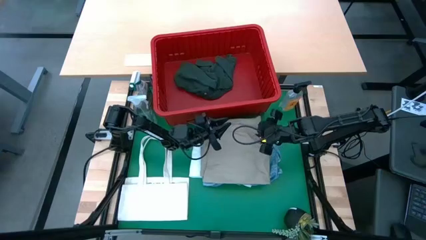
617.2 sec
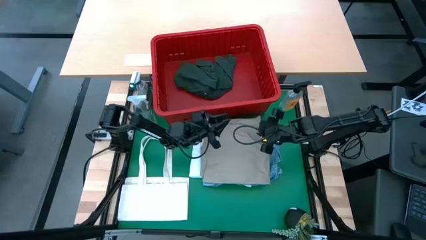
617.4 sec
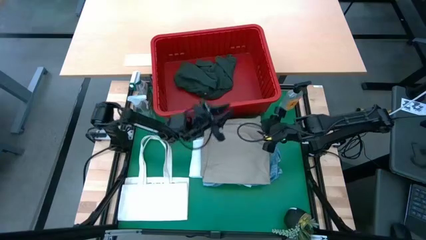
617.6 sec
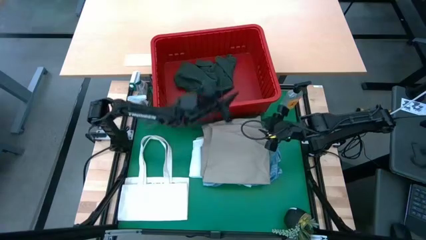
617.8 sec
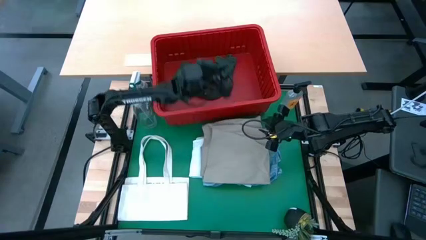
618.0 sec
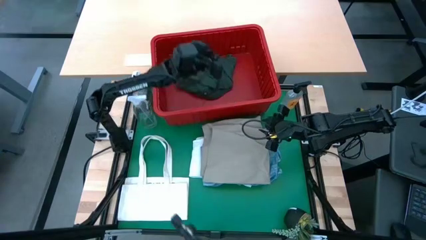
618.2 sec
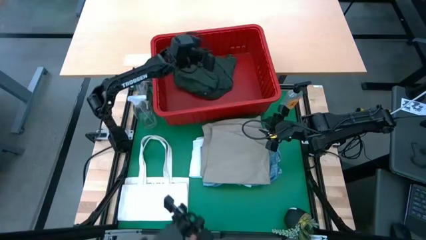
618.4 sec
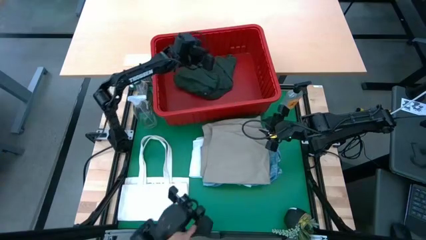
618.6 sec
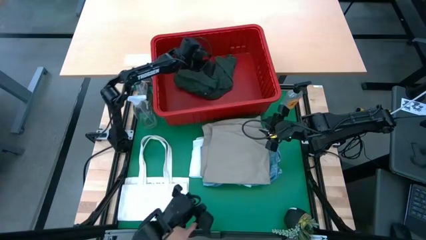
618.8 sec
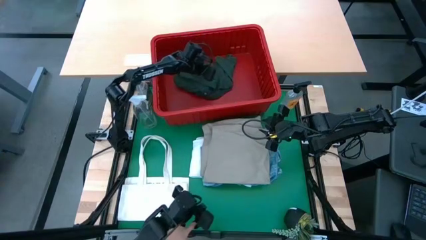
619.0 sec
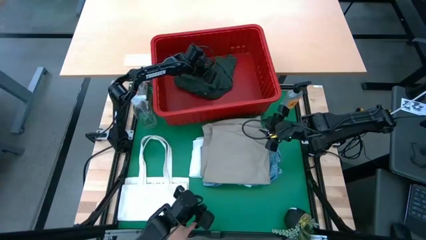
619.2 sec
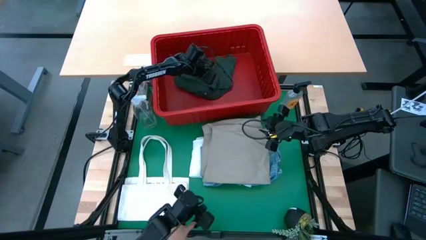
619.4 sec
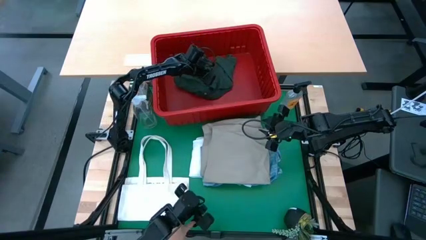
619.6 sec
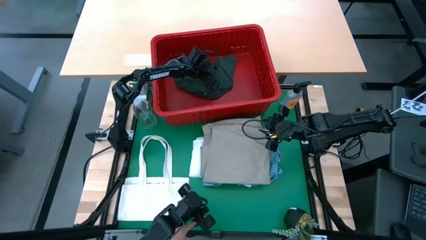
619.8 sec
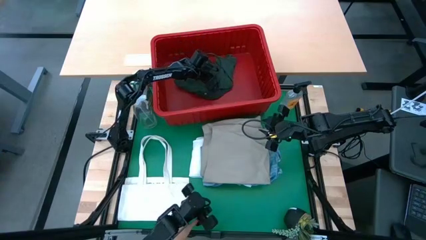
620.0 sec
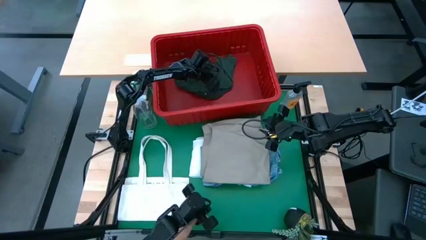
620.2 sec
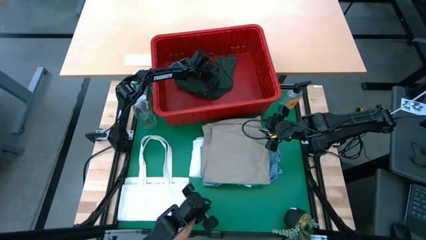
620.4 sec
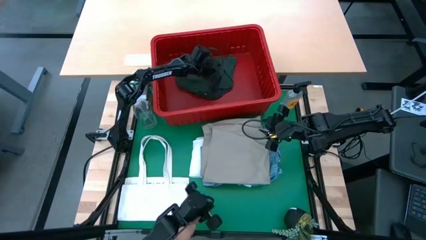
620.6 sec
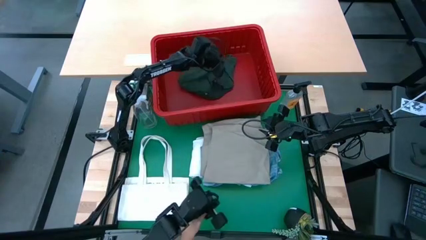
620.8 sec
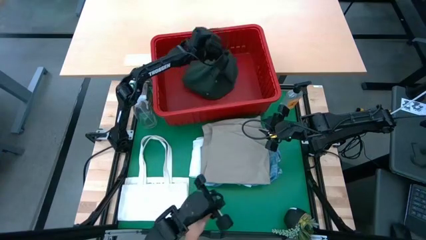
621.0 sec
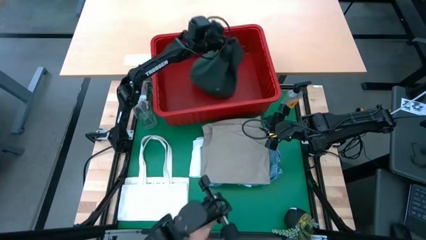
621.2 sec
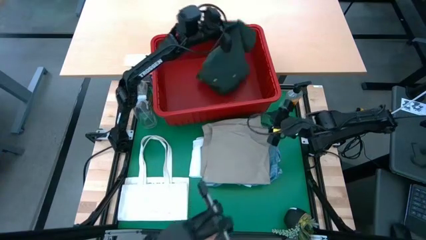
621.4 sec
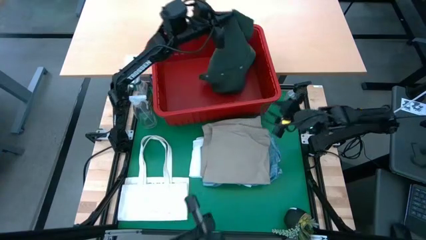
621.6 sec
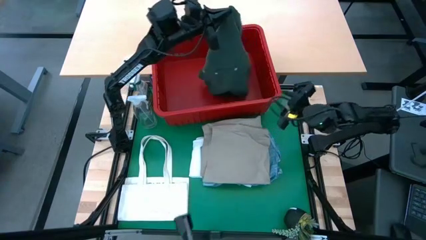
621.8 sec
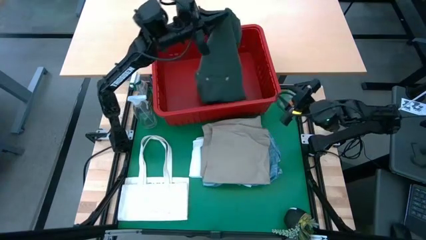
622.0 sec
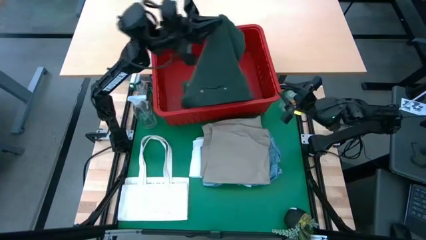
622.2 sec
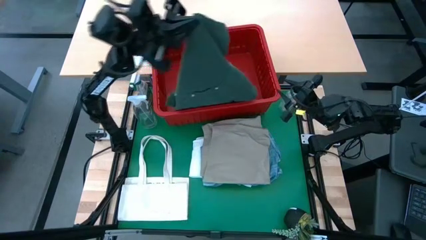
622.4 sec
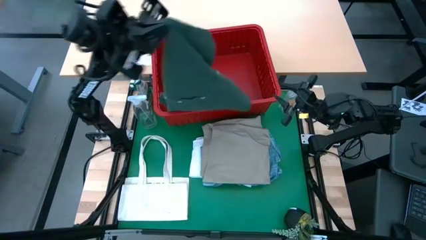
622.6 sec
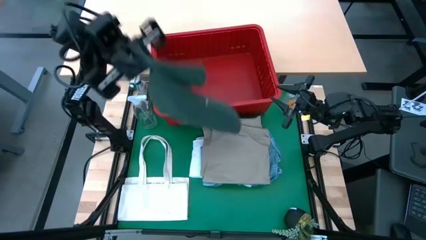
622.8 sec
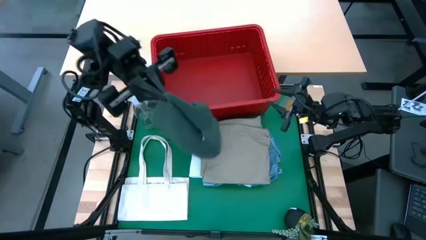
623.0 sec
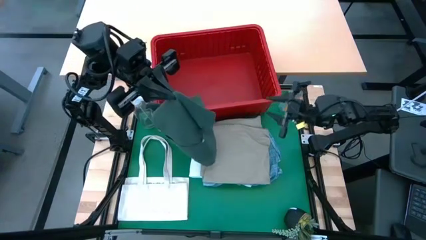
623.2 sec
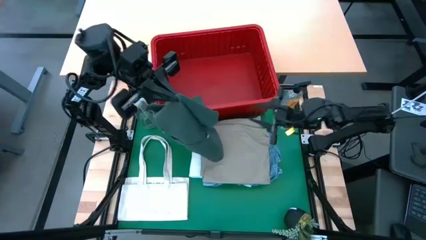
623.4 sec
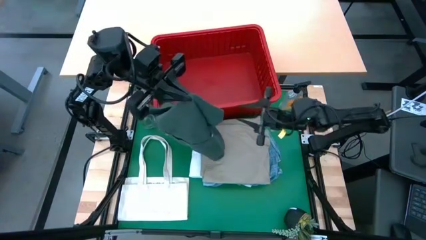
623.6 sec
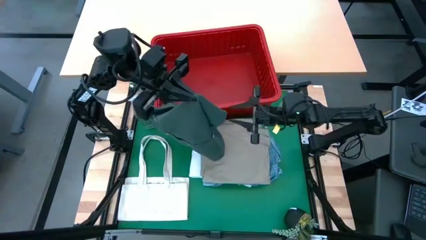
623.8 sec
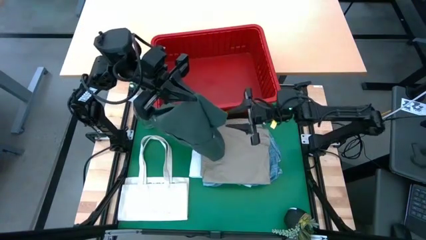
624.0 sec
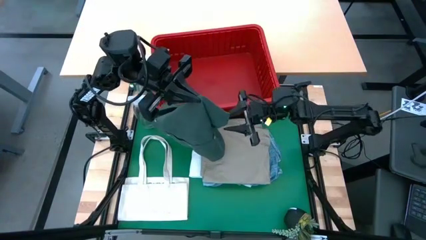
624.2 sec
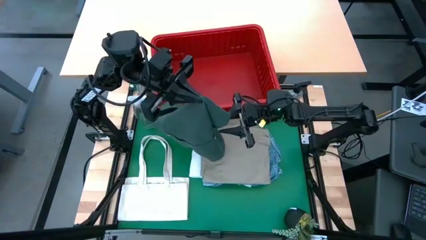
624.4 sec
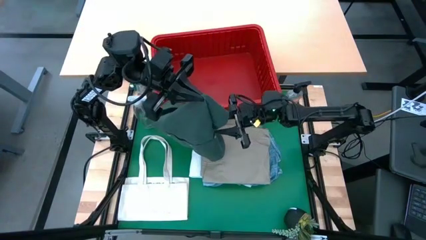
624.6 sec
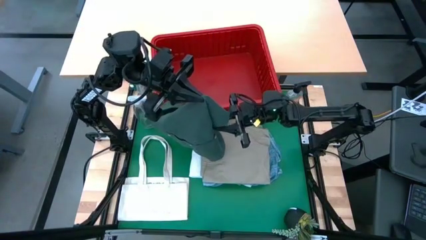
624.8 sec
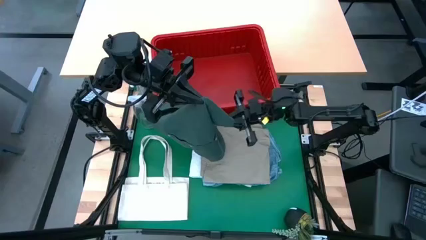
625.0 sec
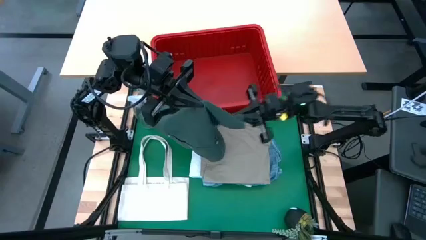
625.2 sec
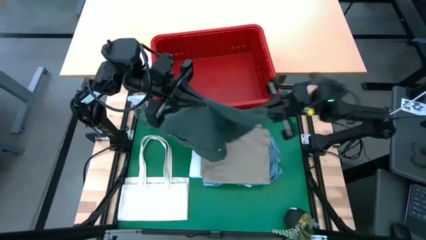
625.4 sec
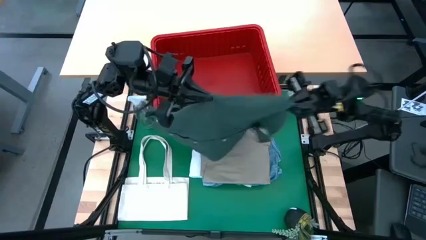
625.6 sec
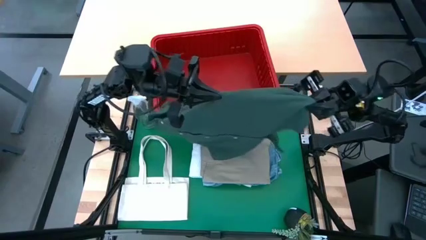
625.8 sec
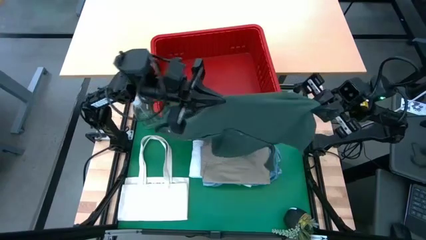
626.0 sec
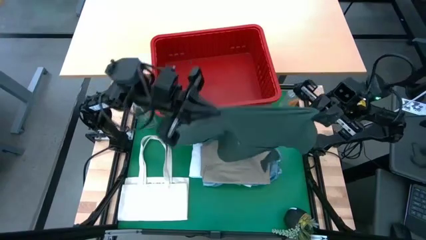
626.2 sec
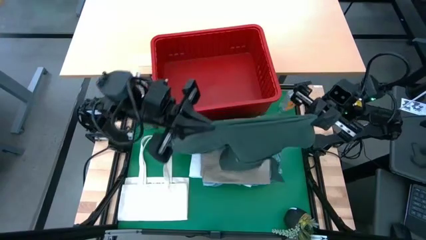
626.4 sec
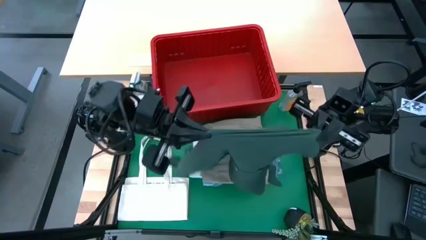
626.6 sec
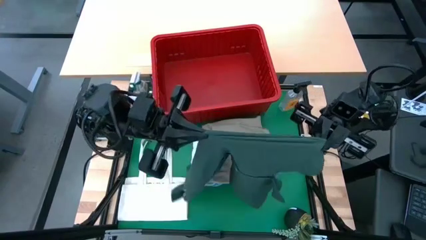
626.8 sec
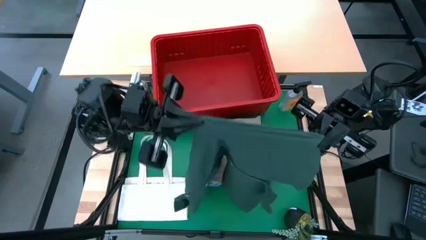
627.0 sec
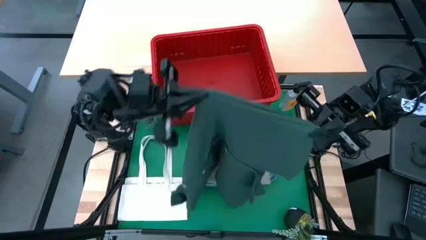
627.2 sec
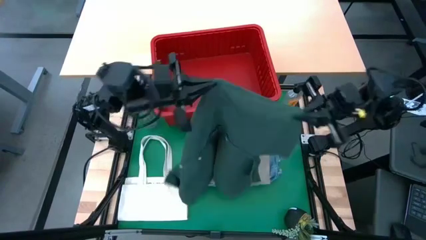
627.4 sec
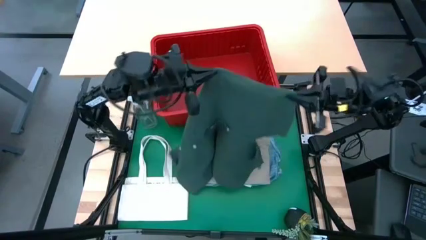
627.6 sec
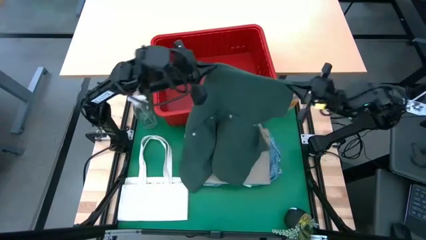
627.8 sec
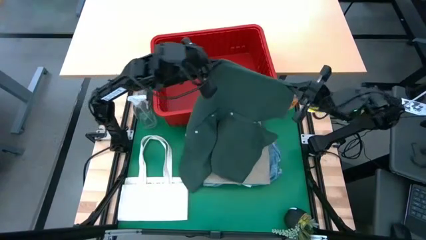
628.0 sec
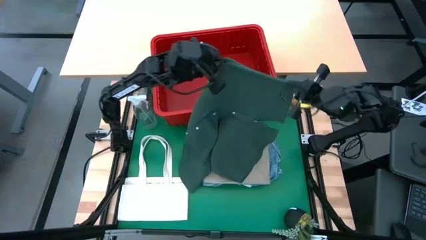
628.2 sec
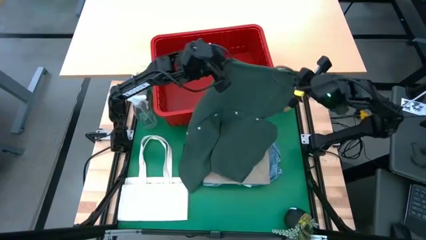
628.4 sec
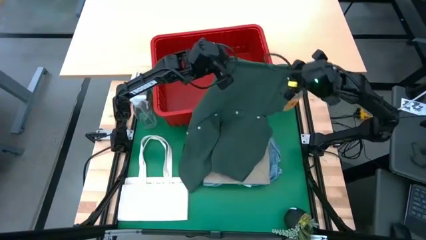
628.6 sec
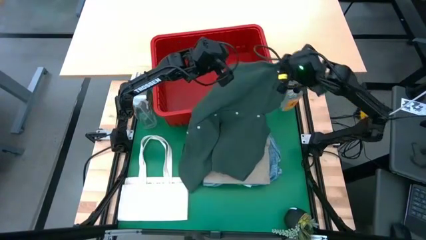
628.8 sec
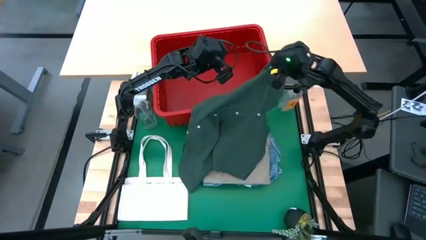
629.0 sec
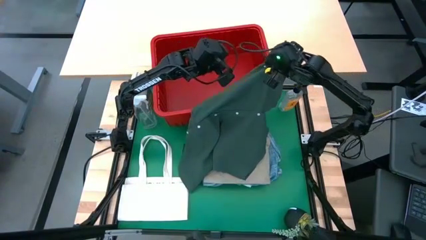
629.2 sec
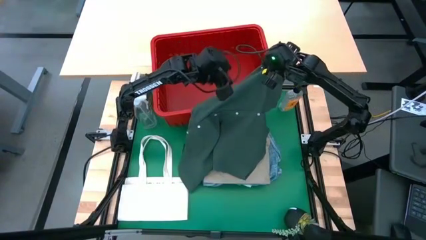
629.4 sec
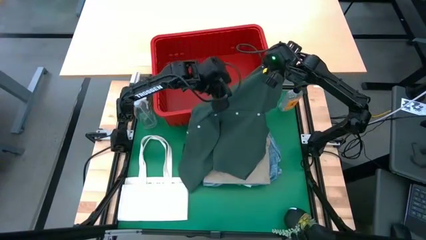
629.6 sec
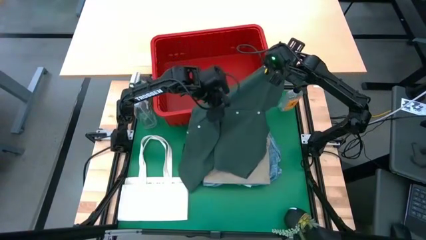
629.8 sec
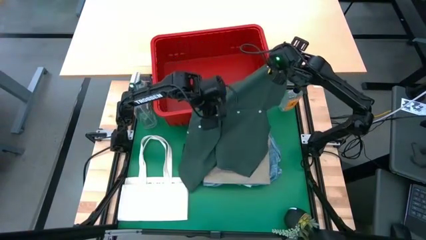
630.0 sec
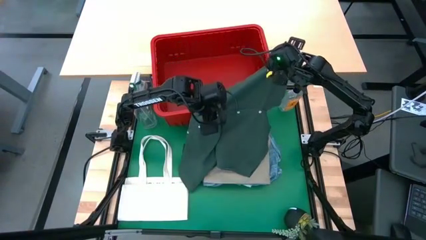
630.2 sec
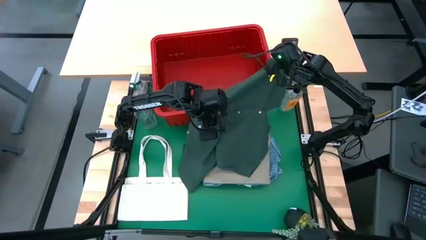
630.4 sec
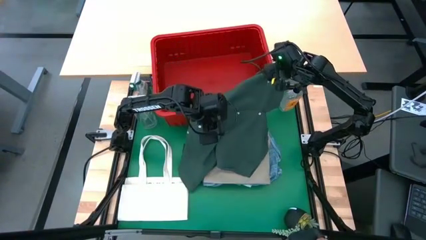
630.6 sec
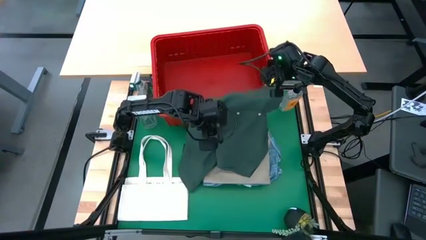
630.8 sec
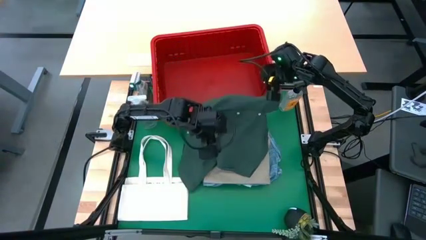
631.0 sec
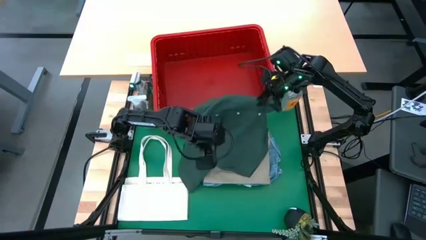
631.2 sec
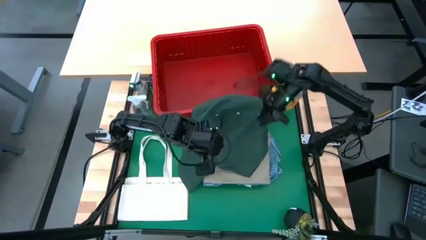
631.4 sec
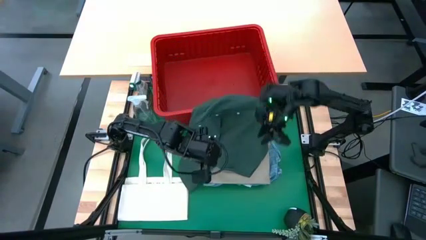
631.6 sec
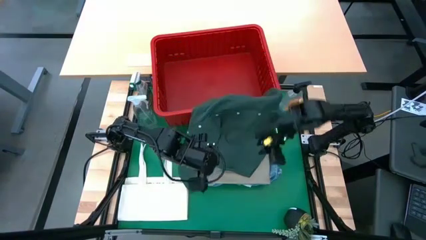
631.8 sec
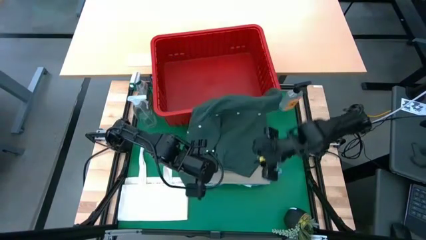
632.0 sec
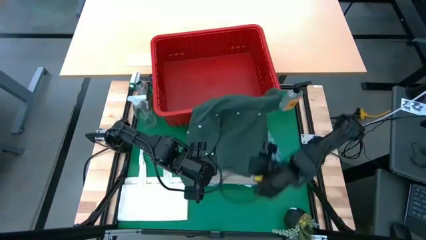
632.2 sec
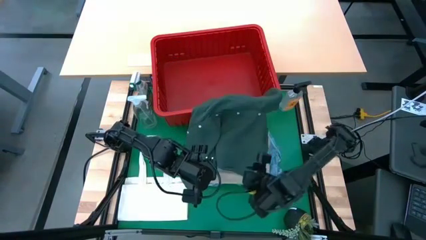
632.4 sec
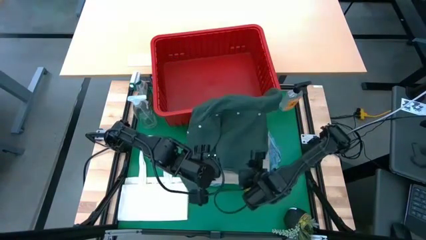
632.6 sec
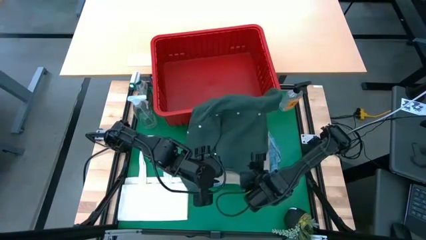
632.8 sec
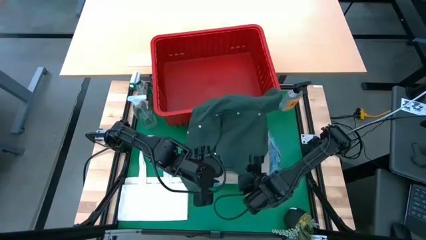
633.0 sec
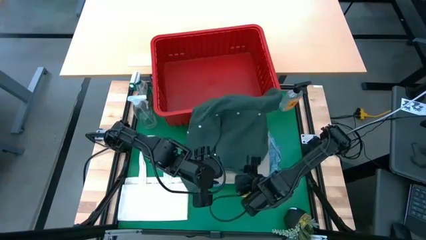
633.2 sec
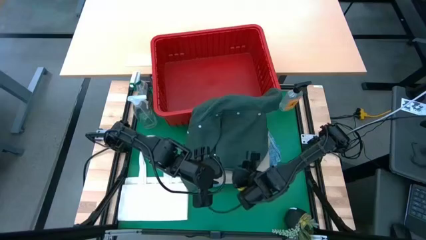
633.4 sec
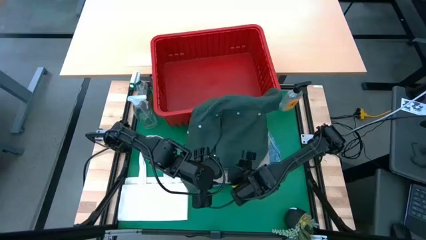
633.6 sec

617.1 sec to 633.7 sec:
Task: Fold Laundry from Bin
Fold the green polo shirt
